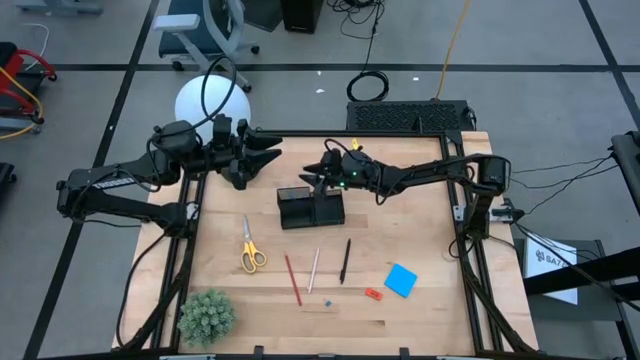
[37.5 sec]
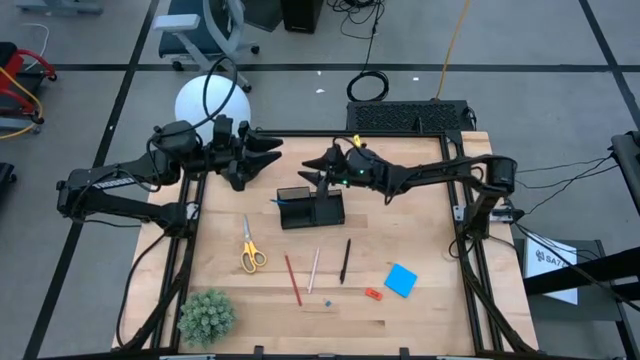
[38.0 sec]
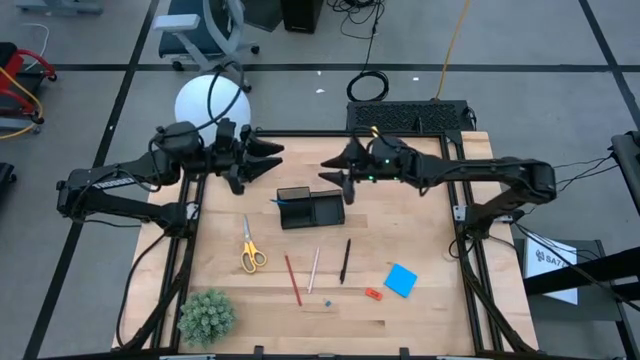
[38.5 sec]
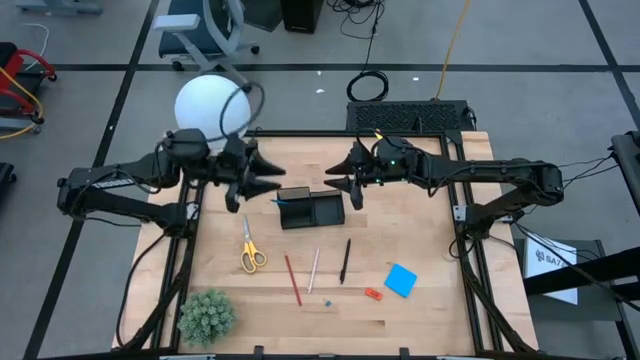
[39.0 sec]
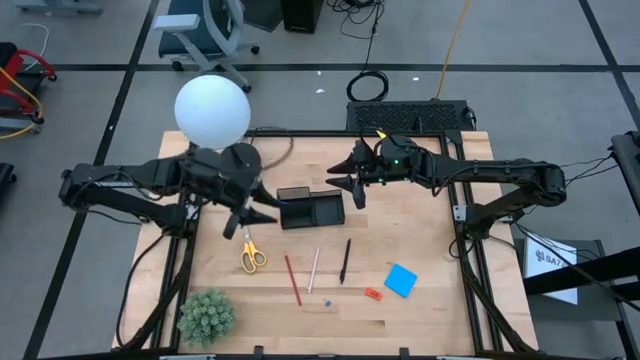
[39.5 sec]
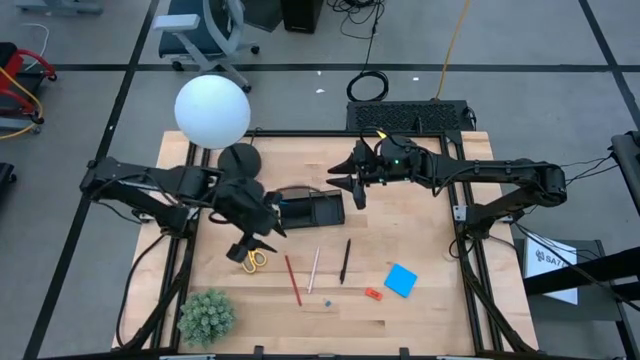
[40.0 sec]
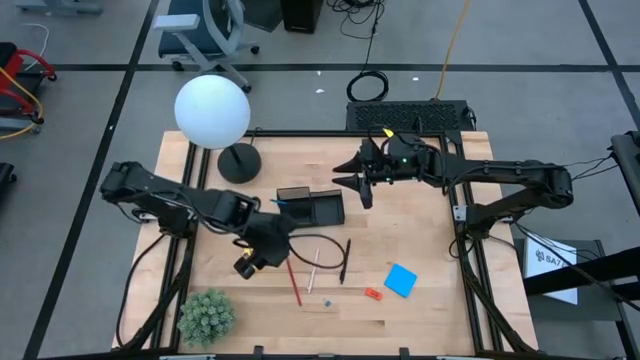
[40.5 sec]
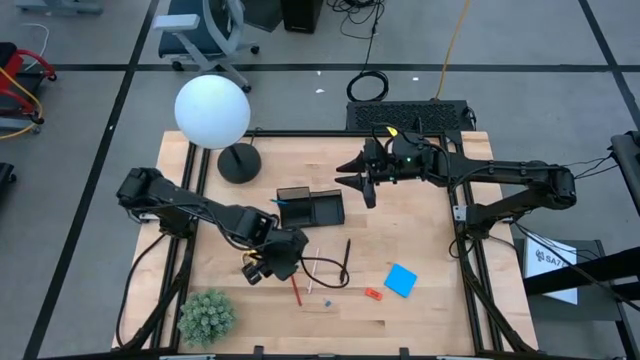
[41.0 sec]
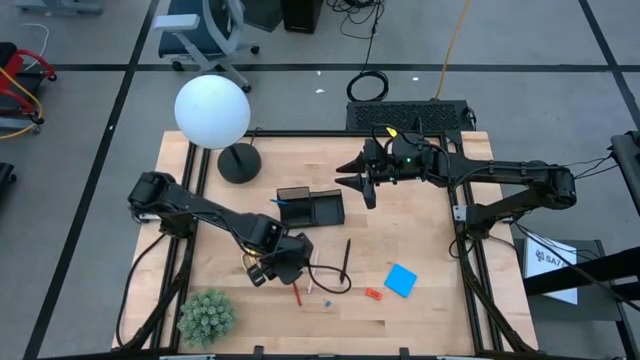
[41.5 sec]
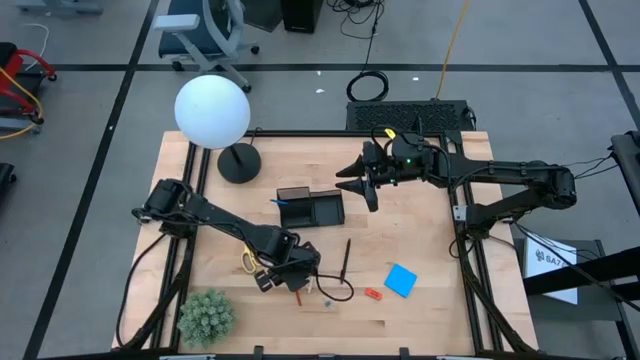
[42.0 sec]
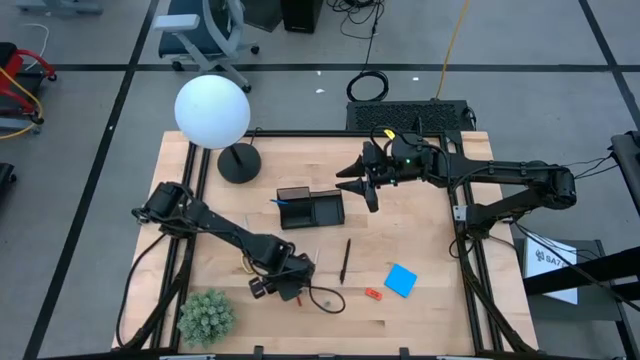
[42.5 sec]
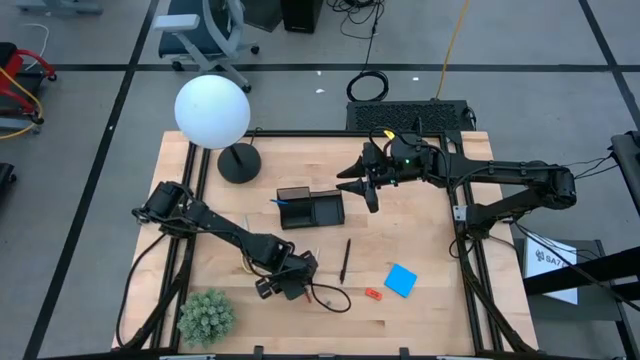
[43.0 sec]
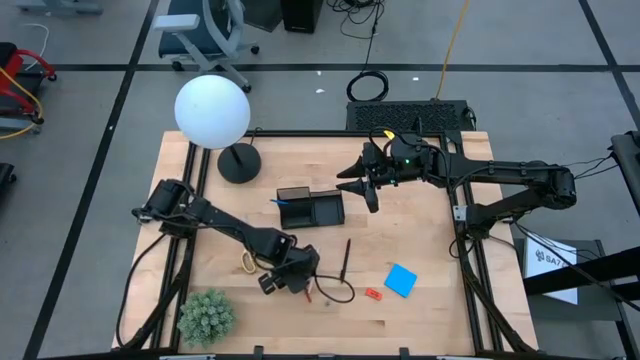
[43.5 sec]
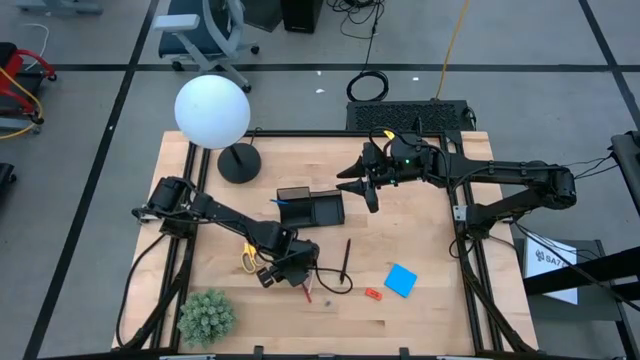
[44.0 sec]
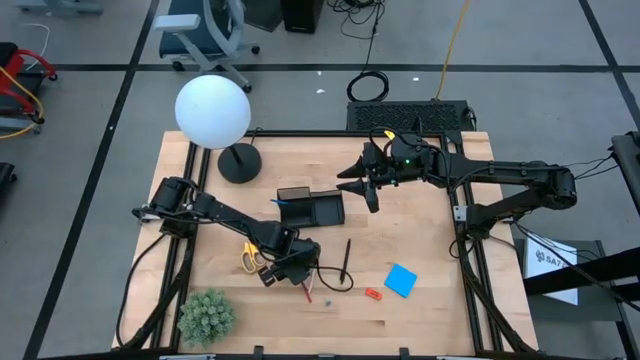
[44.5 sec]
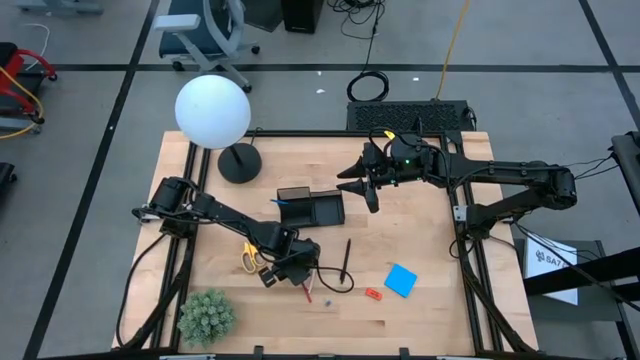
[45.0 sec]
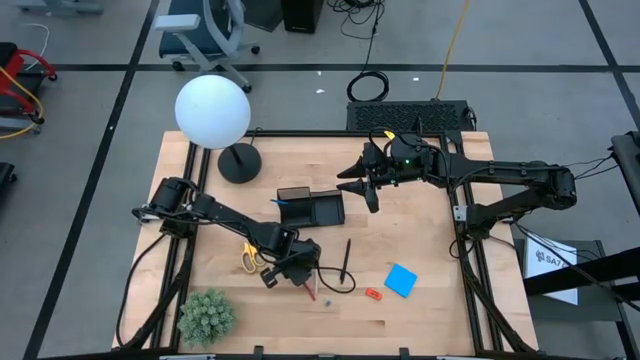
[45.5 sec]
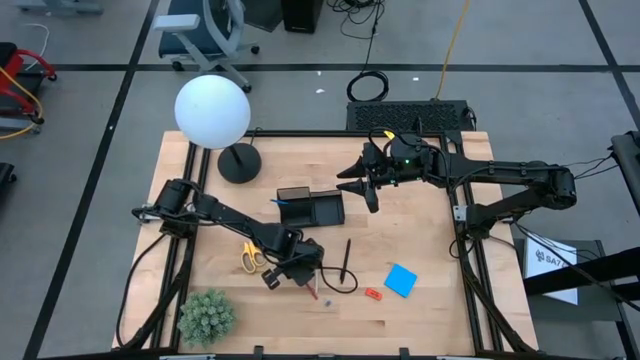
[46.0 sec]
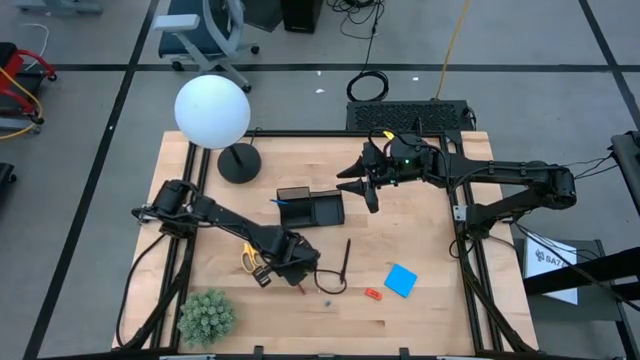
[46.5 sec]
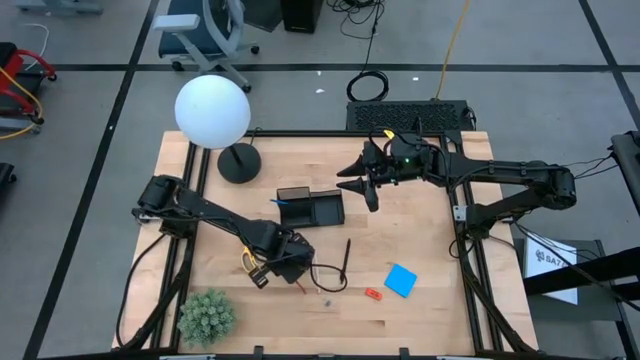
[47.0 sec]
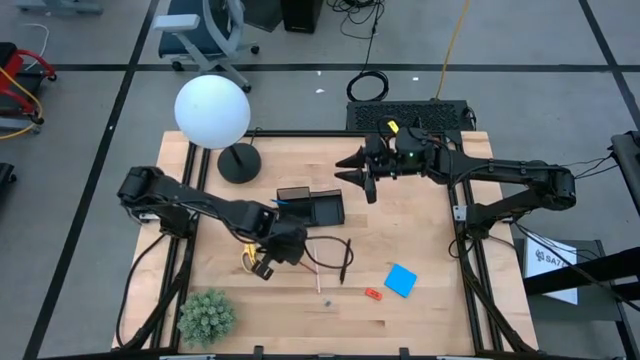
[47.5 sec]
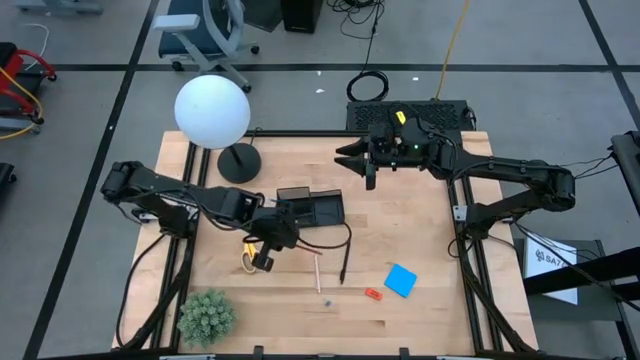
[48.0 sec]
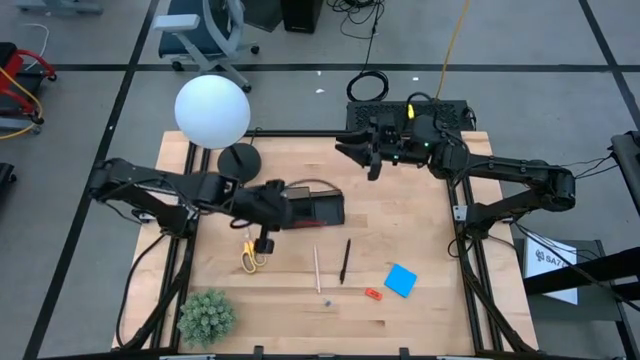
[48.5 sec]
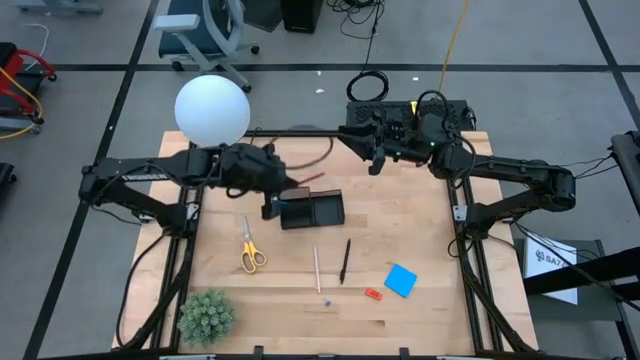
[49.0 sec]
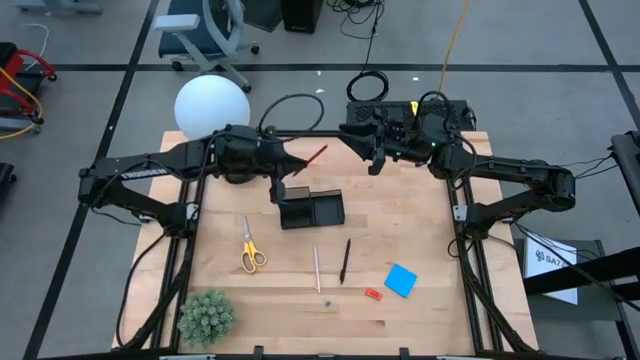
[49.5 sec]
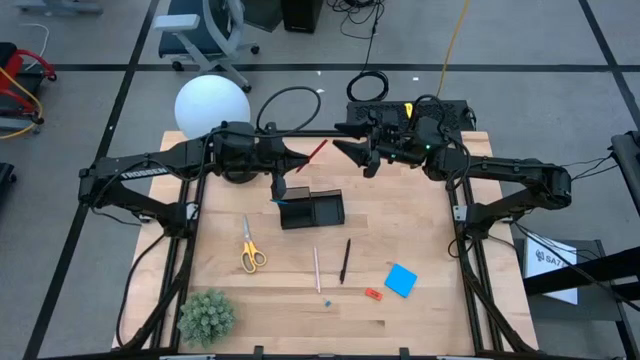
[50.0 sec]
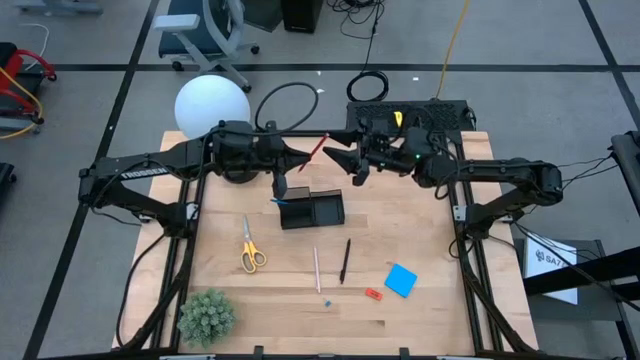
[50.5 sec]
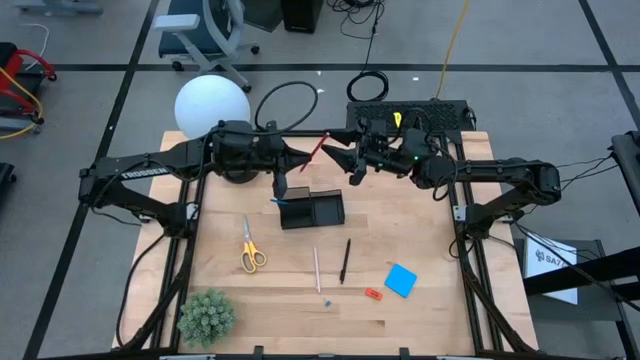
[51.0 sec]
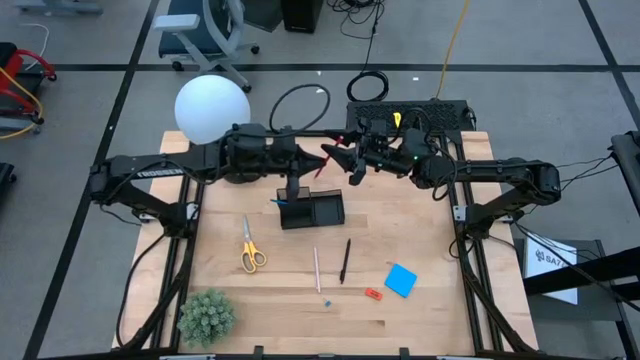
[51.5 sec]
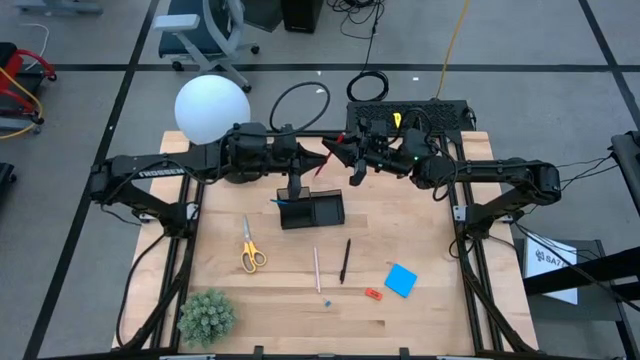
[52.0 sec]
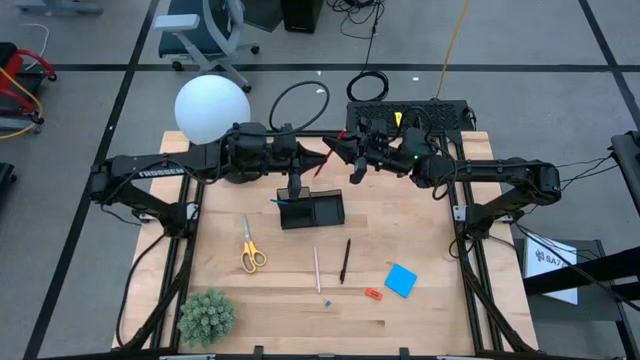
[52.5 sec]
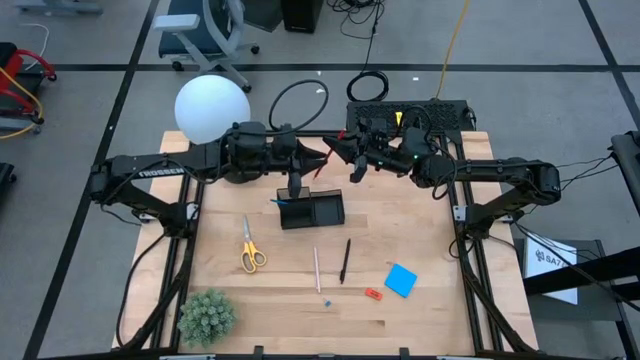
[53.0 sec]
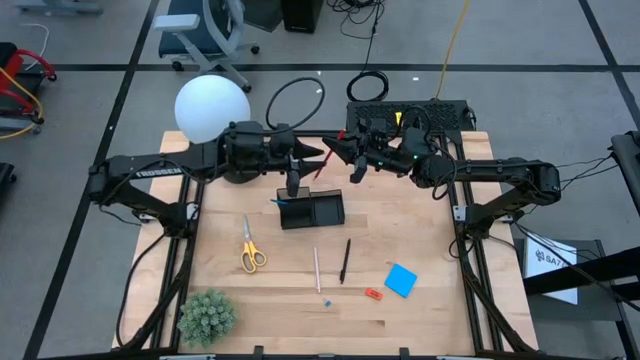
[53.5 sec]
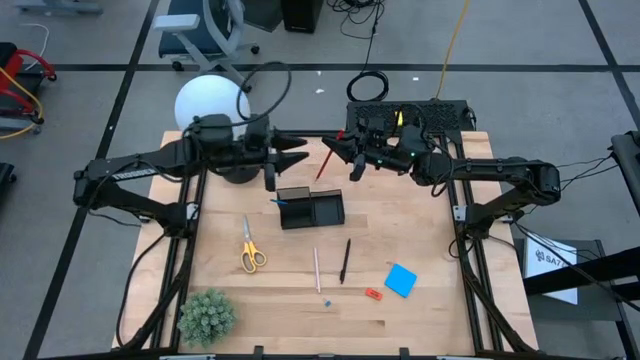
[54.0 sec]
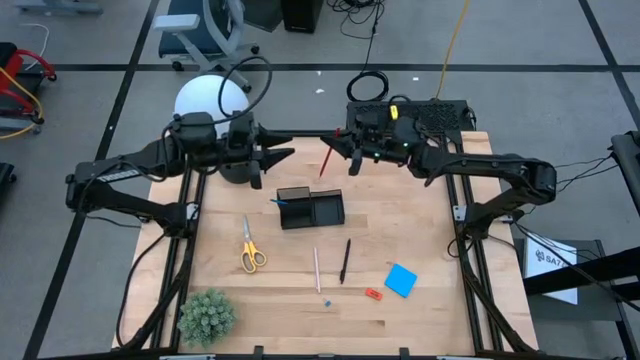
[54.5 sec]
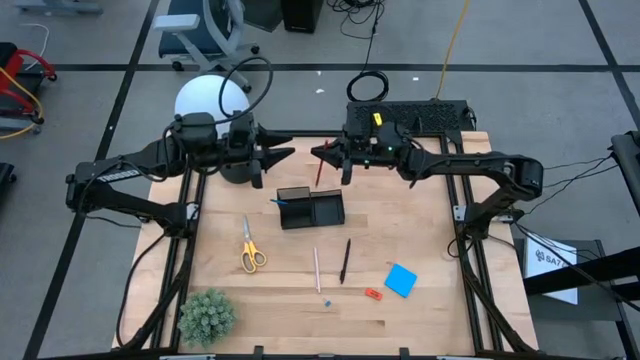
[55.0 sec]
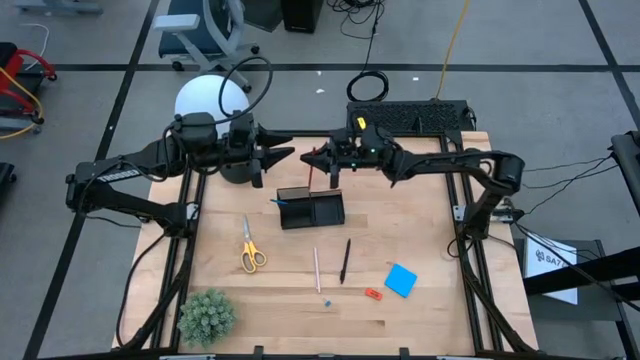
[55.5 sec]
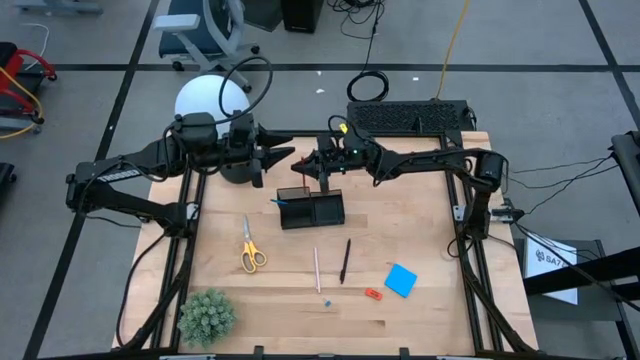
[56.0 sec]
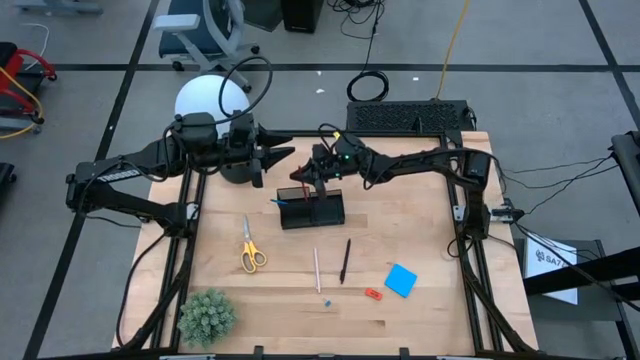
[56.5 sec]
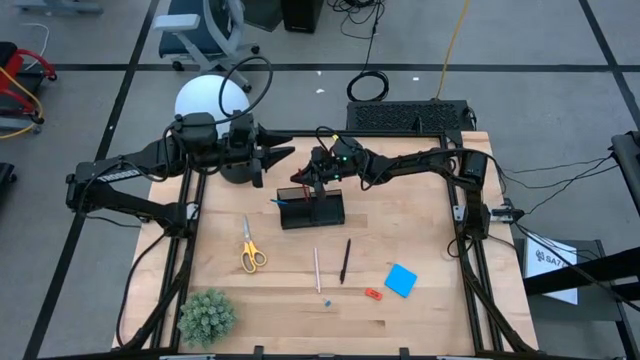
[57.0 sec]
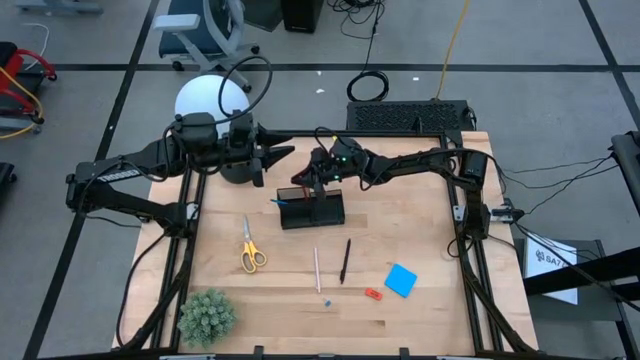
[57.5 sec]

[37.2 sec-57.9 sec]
Task: Pick and place office supplies into organizer
Put the red pencil into the black organizer
